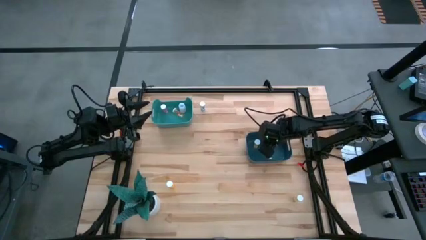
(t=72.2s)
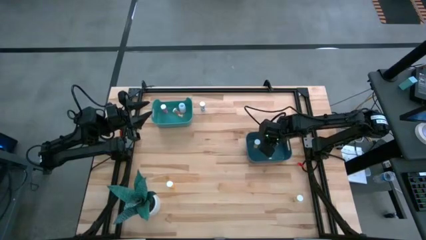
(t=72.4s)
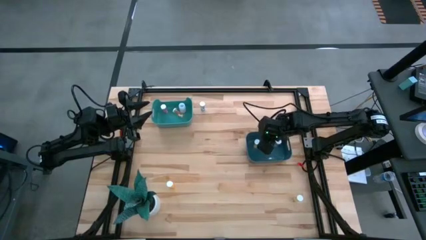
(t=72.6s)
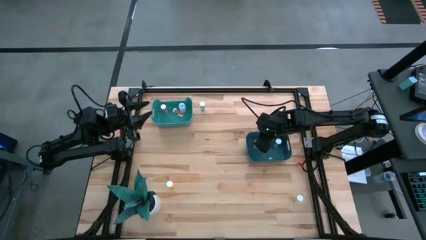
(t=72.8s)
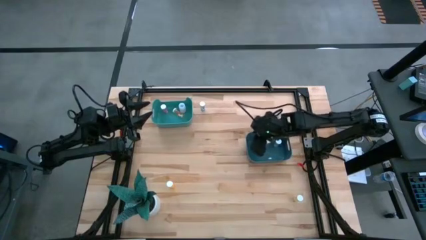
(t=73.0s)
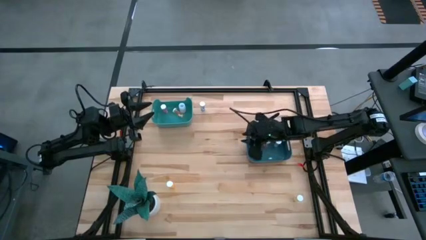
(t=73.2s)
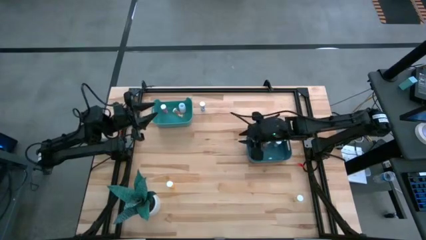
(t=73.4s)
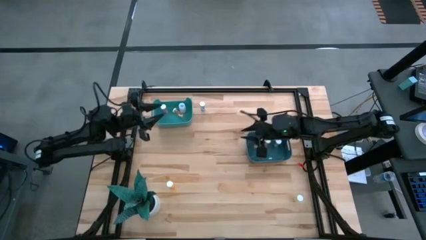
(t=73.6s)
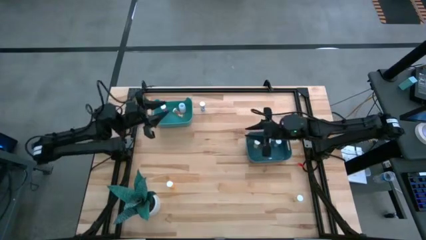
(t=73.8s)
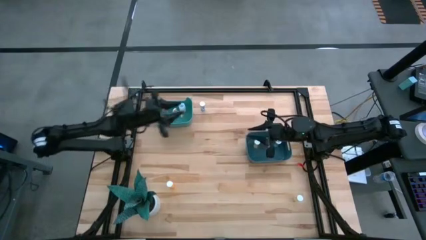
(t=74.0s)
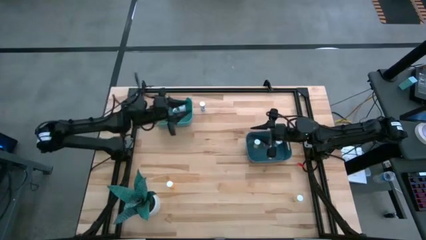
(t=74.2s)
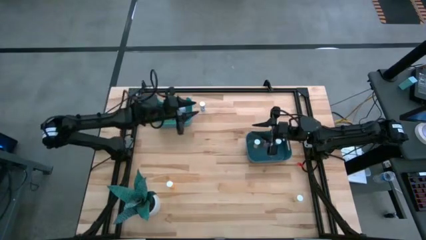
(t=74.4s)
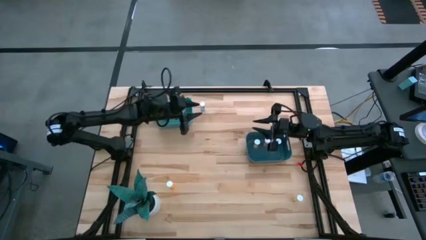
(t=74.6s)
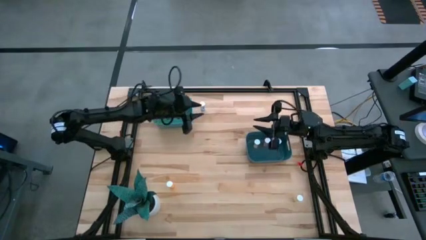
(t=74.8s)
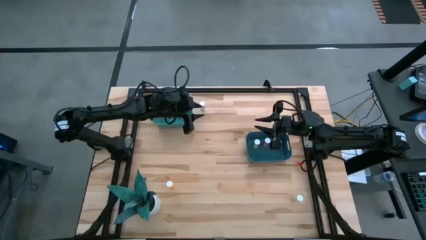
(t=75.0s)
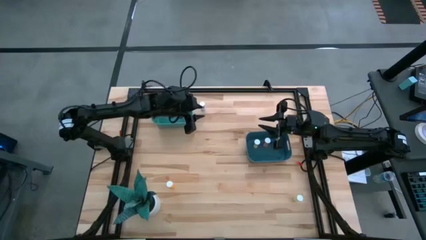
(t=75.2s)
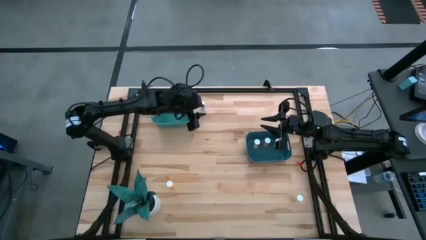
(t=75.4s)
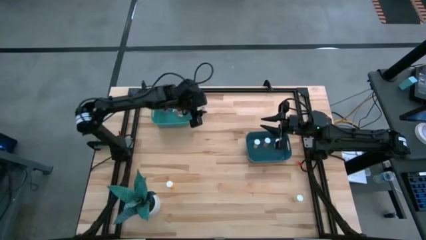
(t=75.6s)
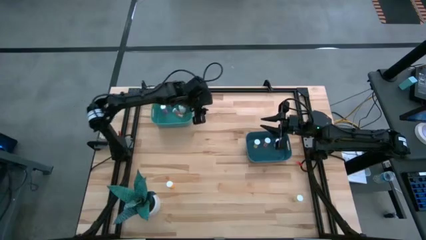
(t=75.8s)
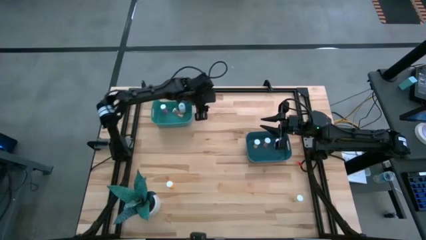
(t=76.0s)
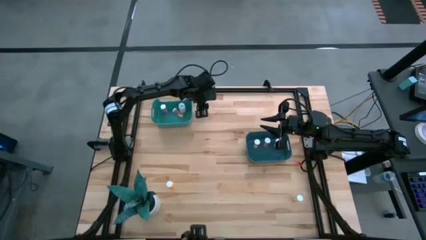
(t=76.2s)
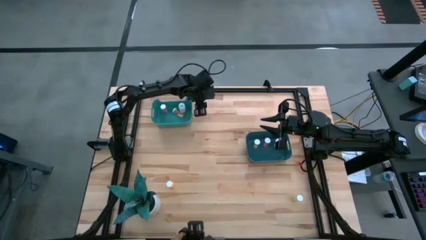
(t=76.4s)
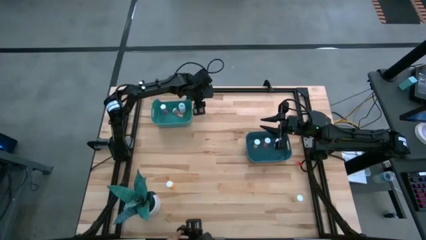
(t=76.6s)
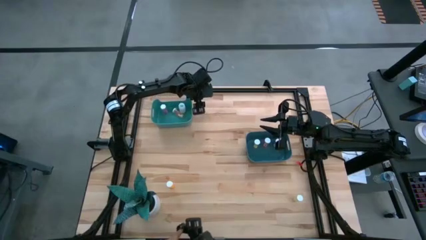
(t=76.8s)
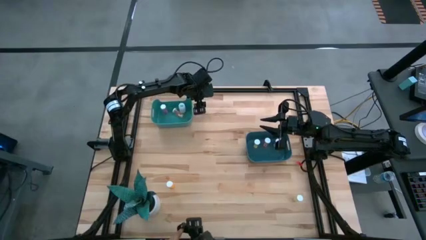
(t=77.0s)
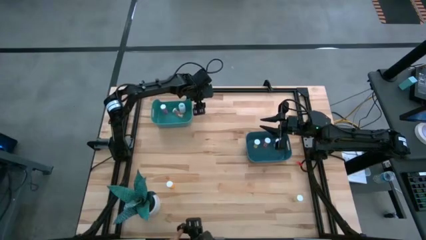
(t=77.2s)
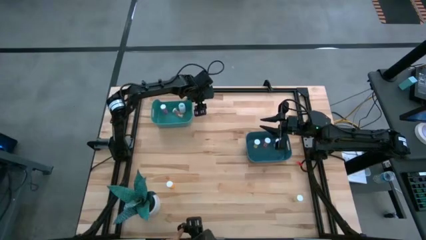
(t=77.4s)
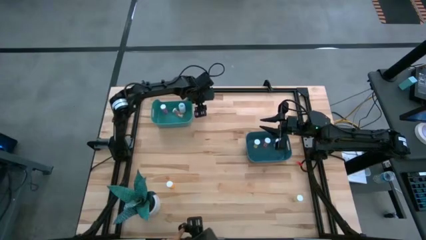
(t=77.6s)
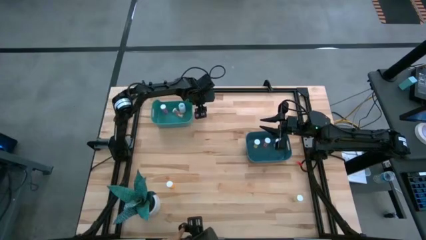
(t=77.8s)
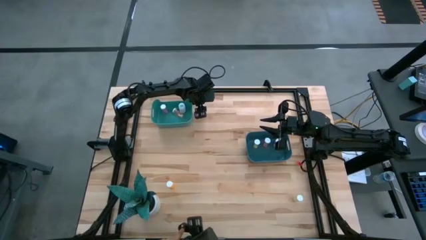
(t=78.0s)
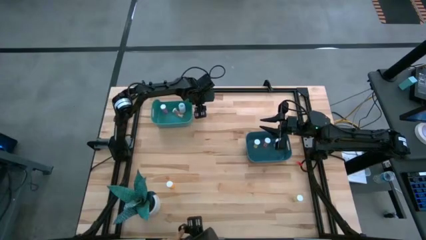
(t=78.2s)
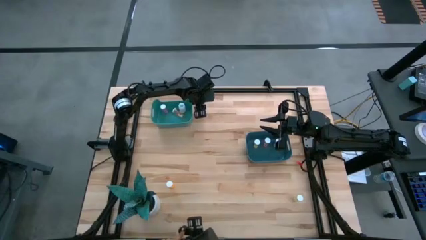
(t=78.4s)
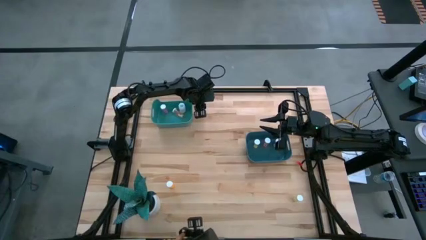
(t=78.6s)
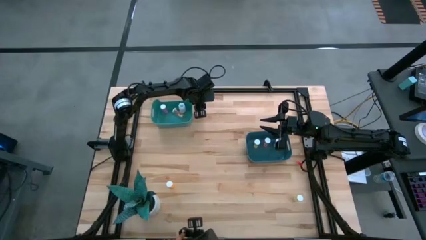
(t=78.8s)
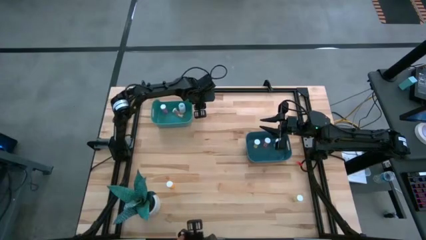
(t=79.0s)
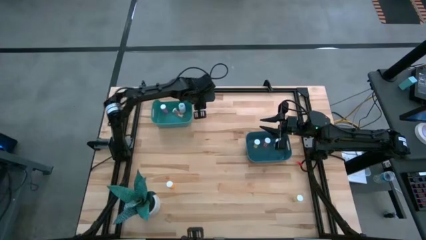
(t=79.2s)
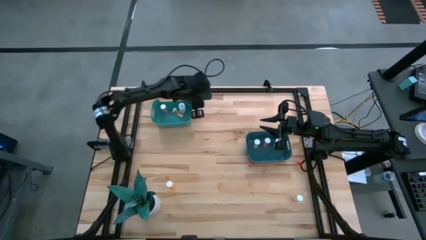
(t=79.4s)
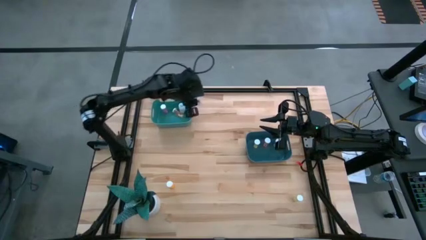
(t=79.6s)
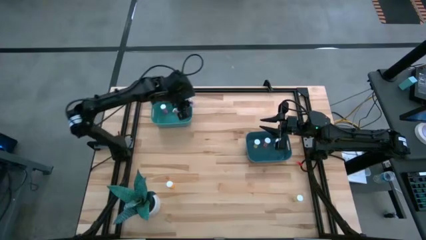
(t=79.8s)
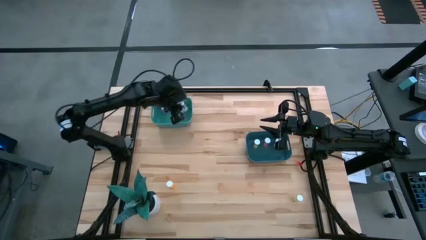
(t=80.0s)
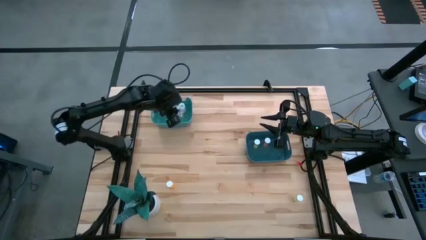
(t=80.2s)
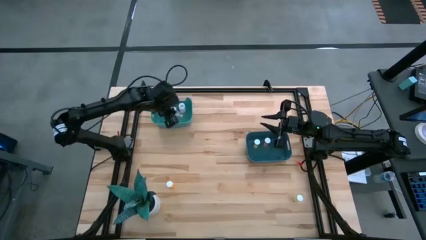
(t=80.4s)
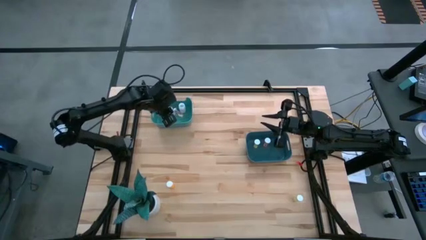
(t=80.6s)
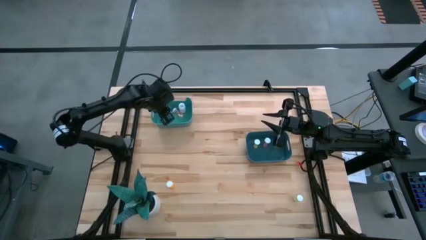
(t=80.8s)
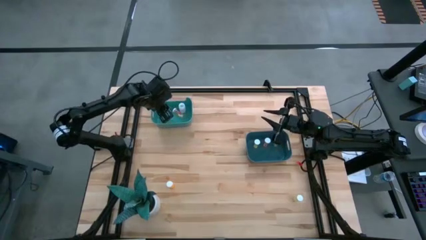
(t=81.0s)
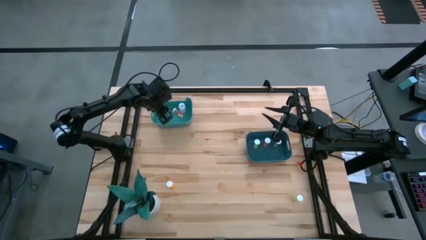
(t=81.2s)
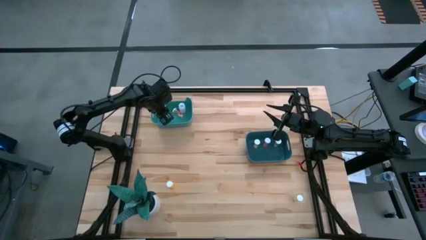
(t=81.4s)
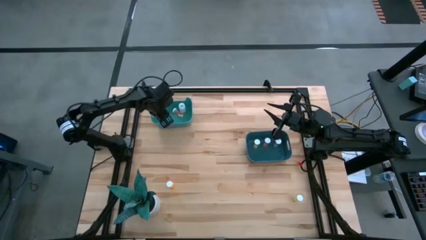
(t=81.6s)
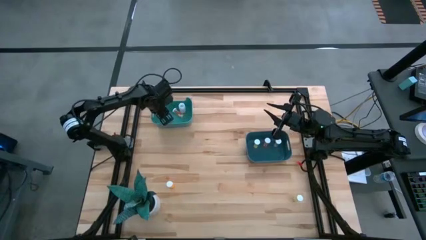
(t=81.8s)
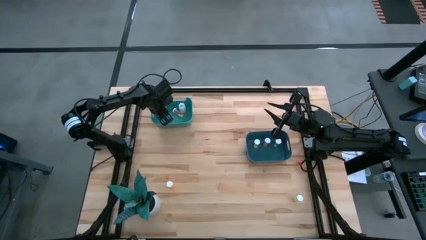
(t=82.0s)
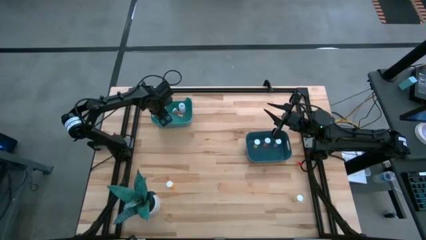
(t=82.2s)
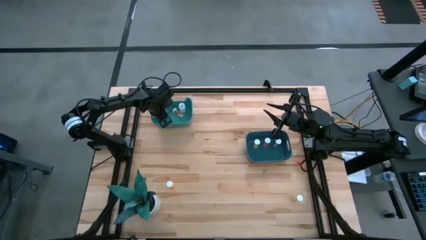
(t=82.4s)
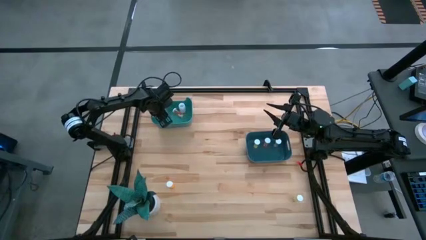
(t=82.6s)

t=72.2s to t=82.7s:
Task: Pick and place medicine bottles into bin by pill shape (circle, oval)
Put the blue capsule bottle into the green bin

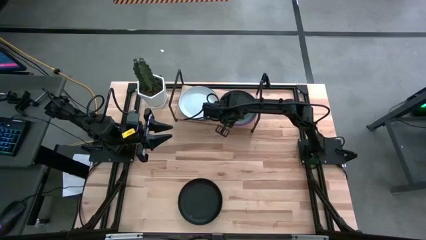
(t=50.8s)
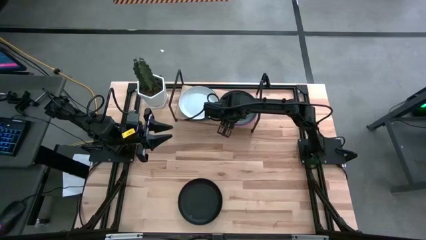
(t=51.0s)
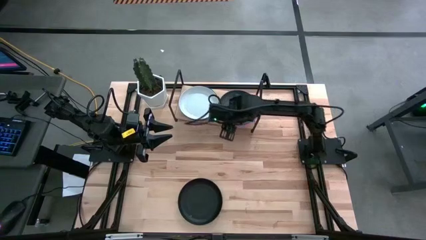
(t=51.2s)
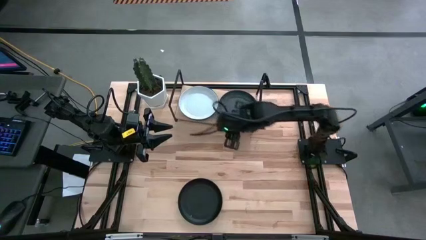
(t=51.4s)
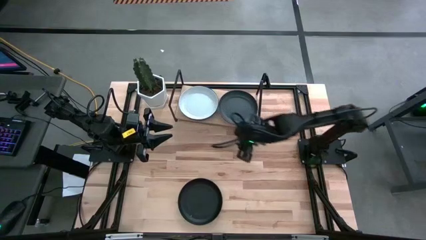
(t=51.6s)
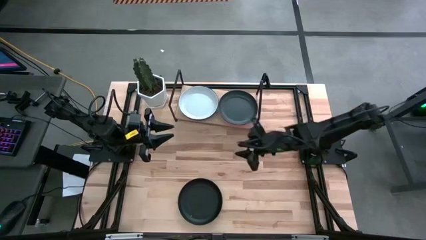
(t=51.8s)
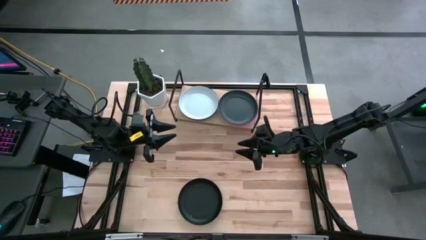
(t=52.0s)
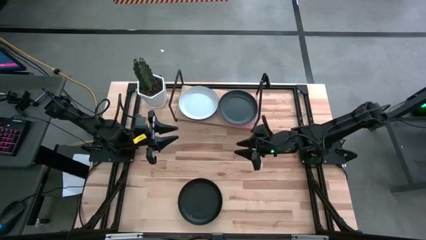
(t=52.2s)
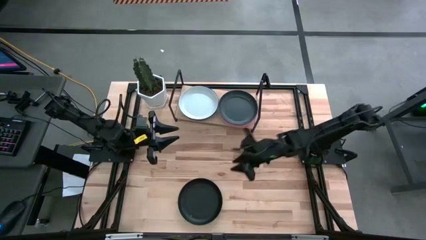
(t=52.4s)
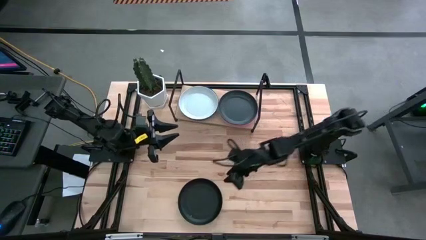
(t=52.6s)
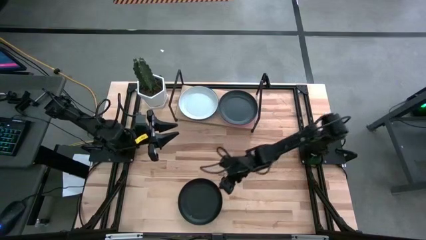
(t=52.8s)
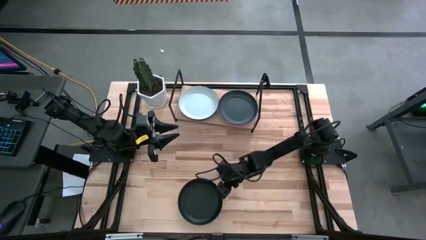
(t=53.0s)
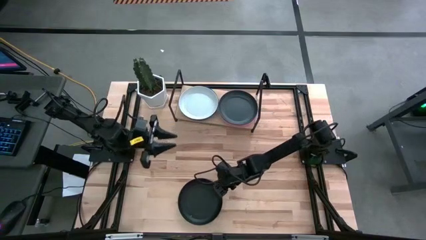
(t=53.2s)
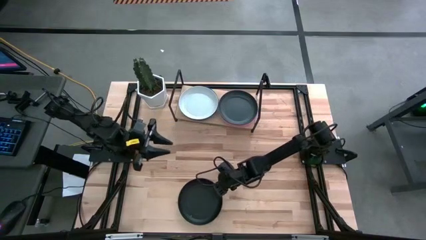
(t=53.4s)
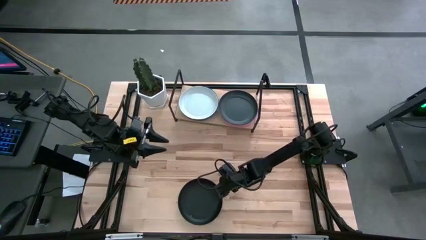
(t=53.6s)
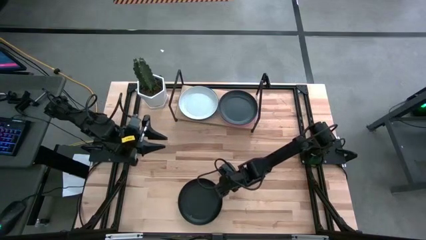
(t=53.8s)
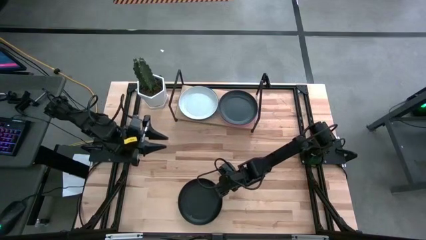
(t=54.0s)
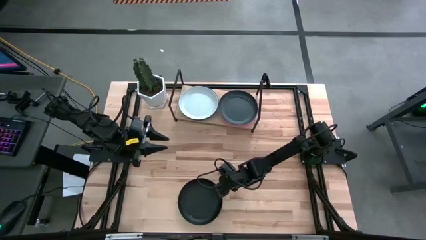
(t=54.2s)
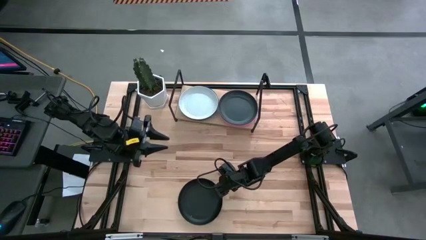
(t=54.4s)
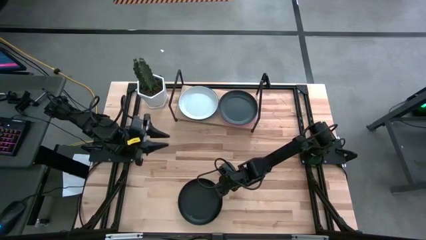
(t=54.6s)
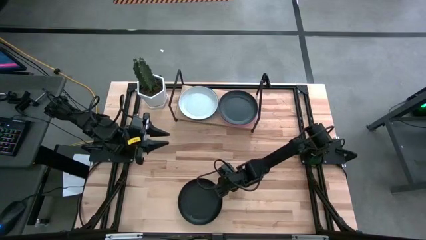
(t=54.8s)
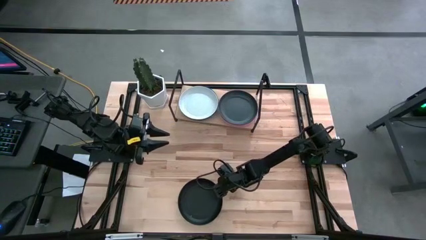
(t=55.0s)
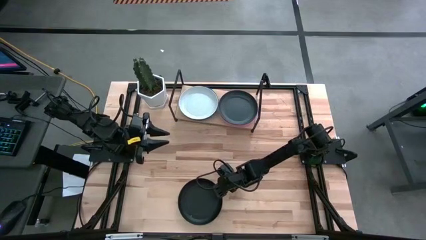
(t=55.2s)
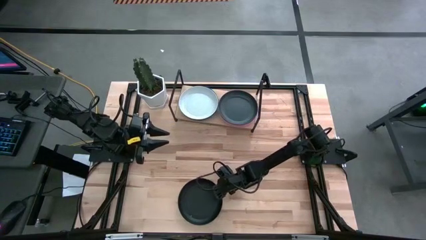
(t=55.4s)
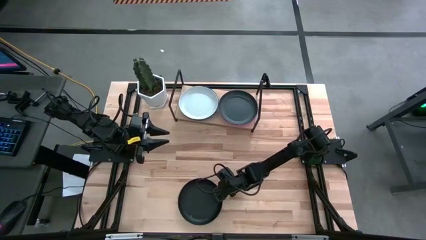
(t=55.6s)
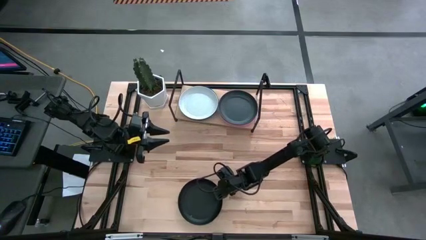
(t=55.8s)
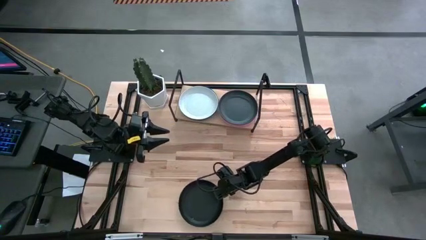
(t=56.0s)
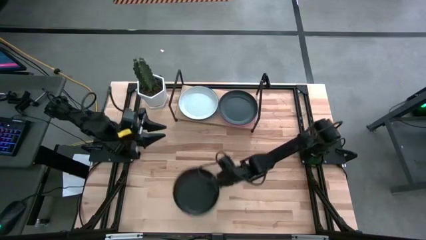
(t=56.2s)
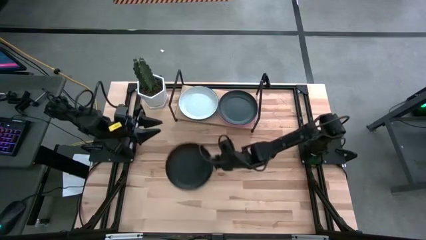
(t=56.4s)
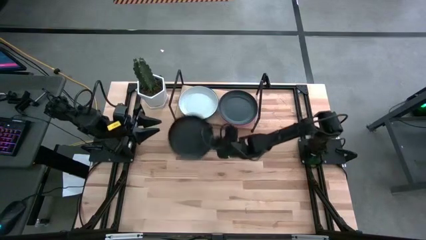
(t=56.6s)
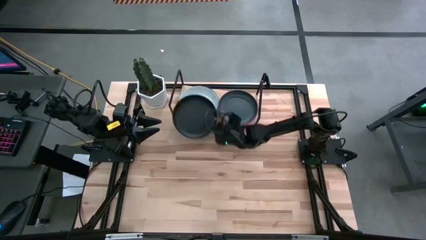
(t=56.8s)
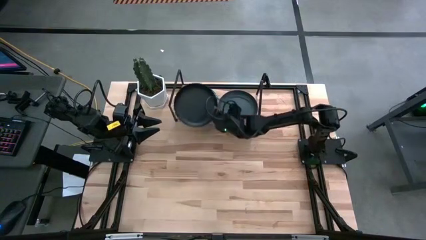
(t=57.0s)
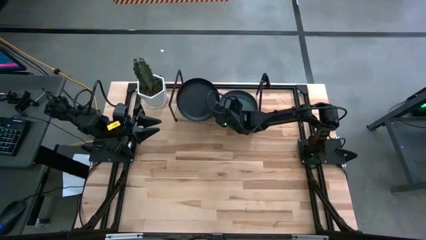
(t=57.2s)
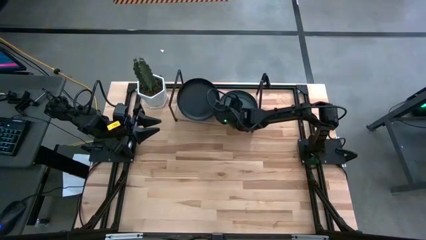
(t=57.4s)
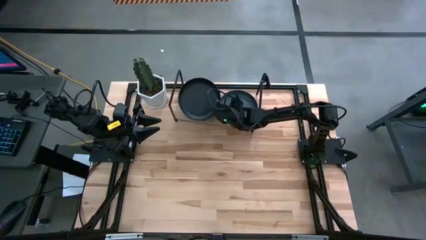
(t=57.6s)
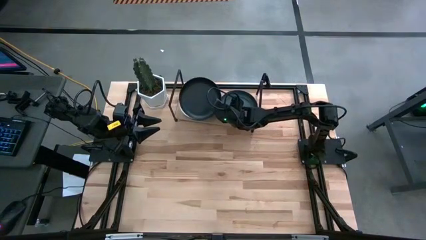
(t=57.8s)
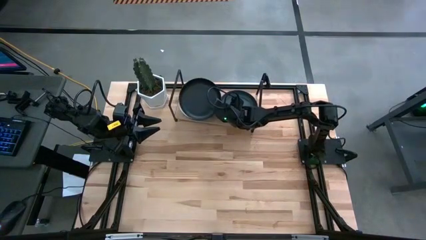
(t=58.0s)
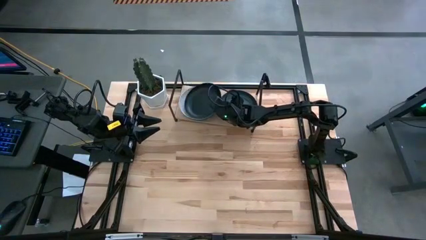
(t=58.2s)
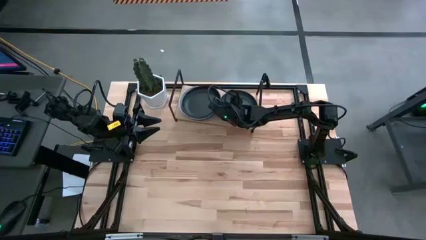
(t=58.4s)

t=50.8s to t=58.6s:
Task: Place and stack plates onto a shelf
Stack the black plate on top of the white plate on the shelf
